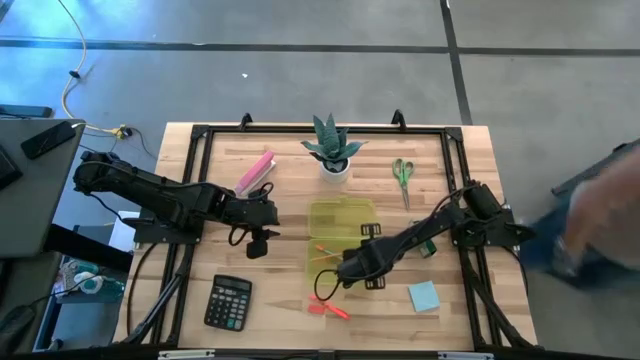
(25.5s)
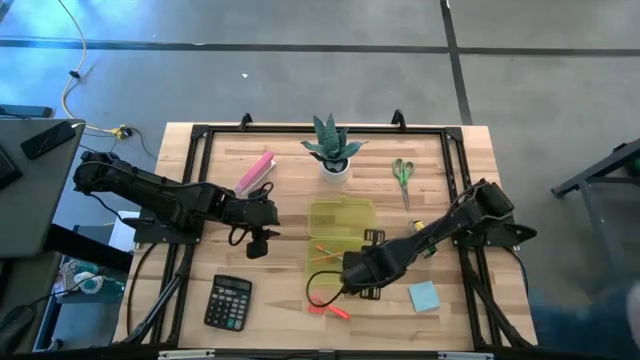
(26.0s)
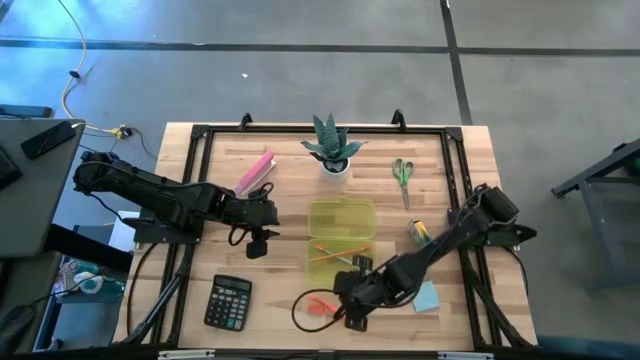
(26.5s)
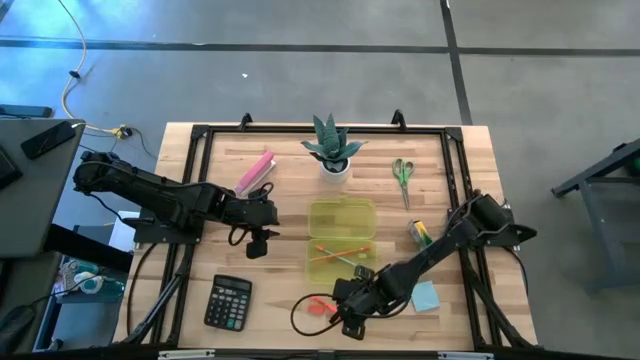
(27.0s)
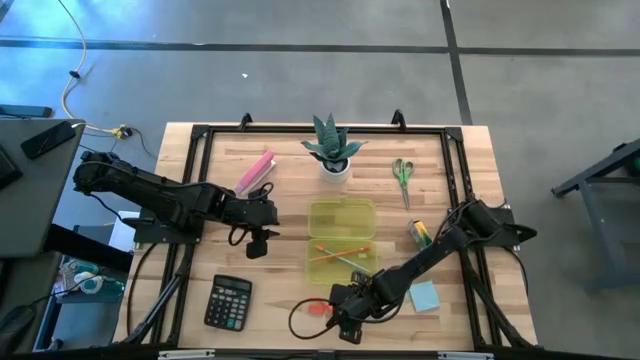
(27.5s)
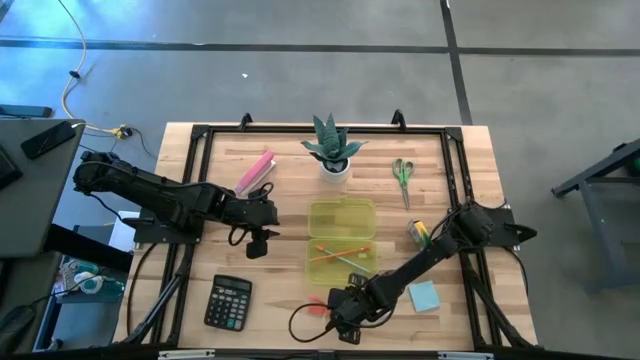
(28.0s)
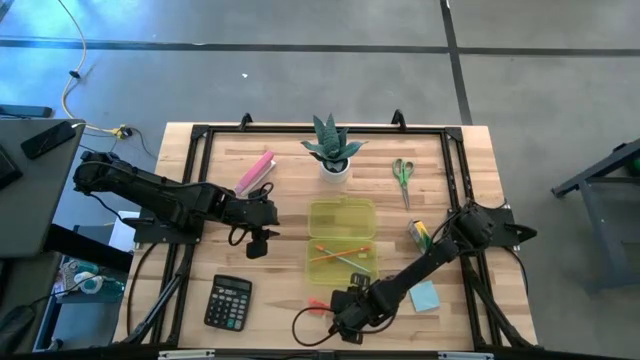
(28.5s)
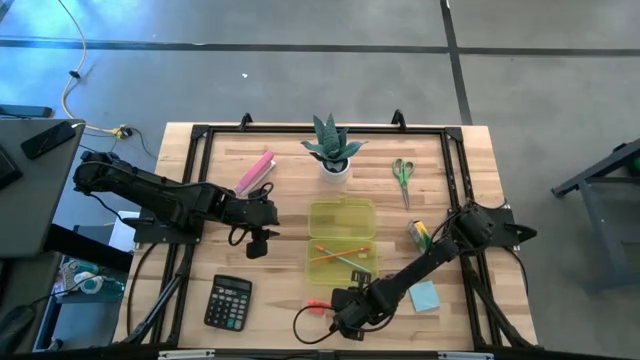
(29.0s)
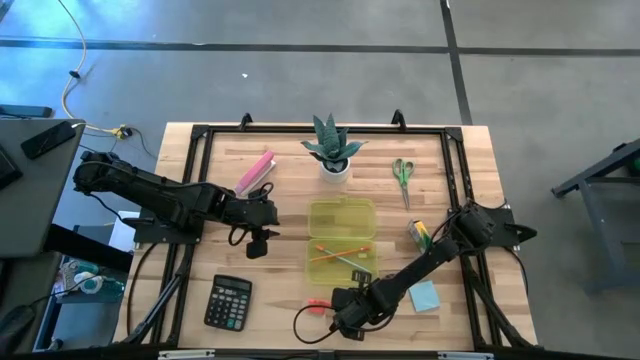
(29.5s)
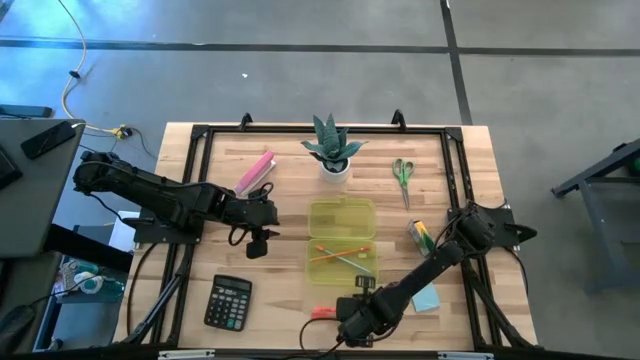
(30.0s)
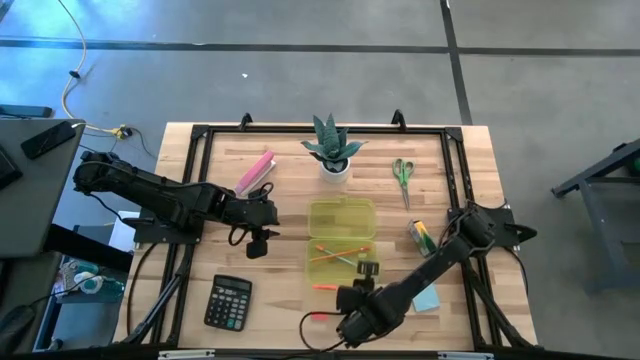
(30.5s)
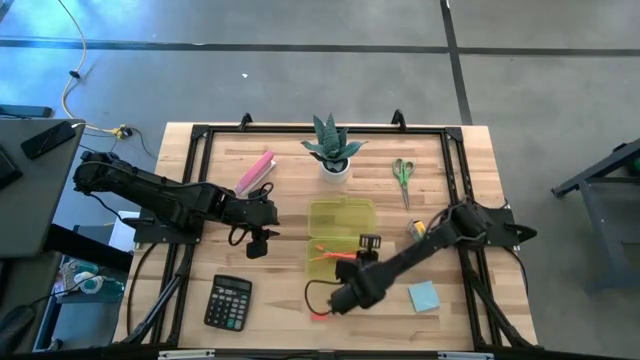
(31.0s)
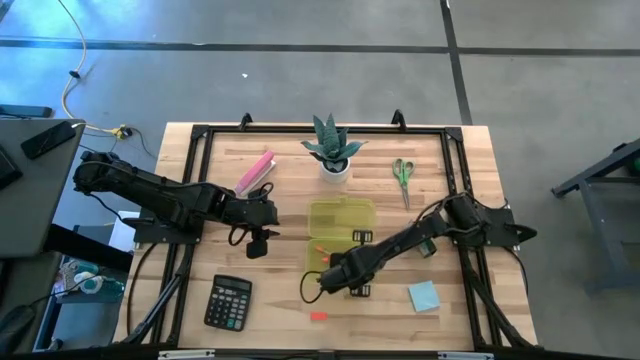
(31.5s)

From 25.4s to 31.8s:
Task: Pack school essentials
Put the orange pen into the supply box

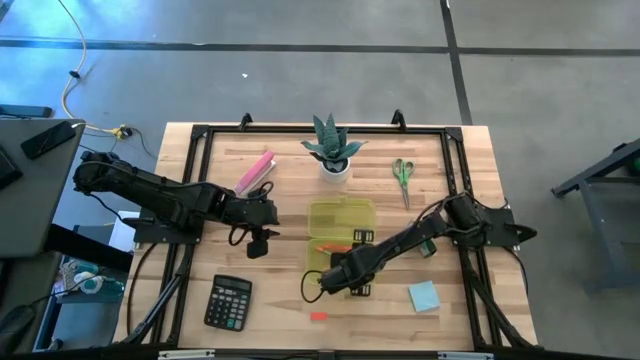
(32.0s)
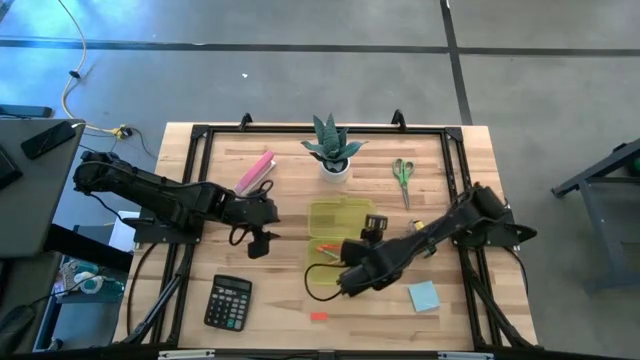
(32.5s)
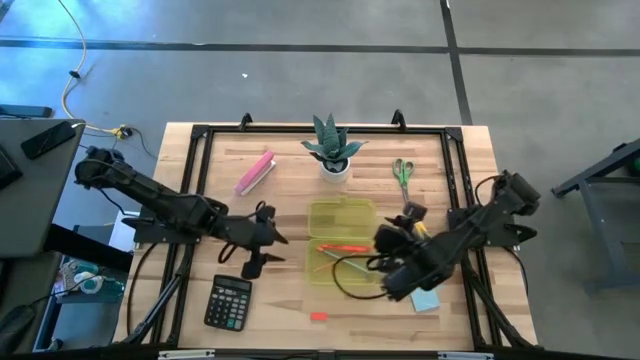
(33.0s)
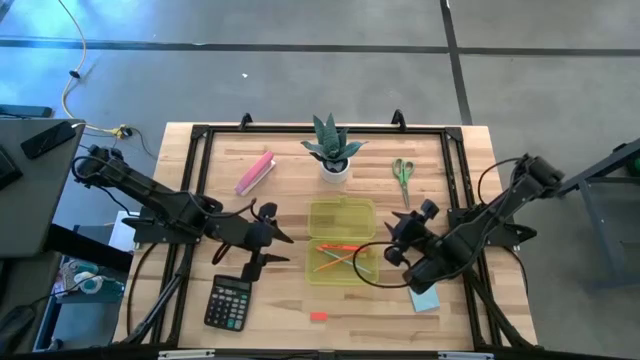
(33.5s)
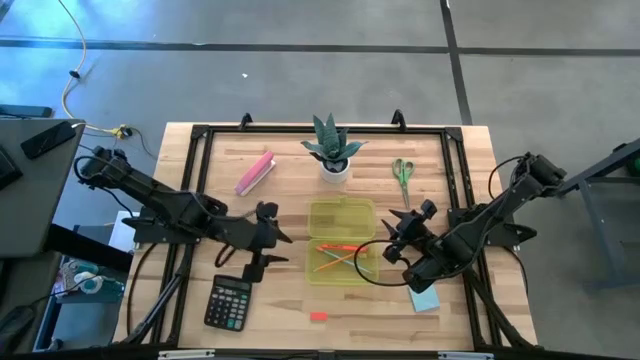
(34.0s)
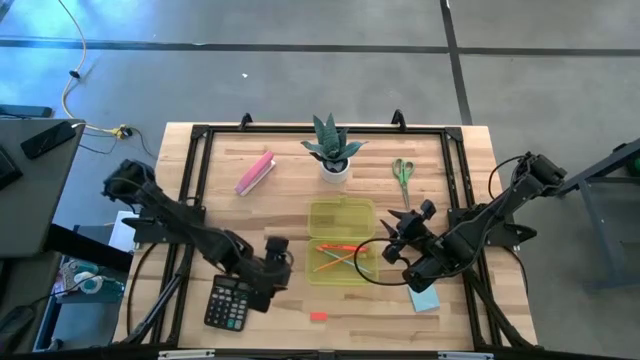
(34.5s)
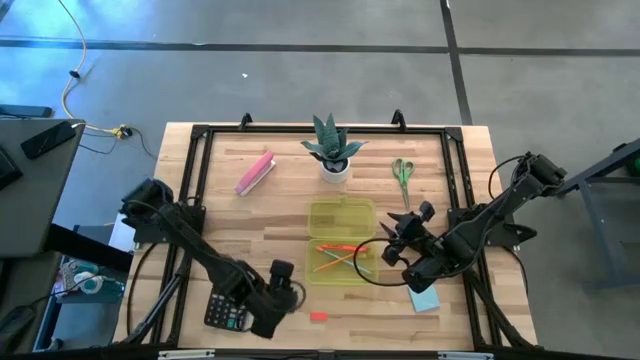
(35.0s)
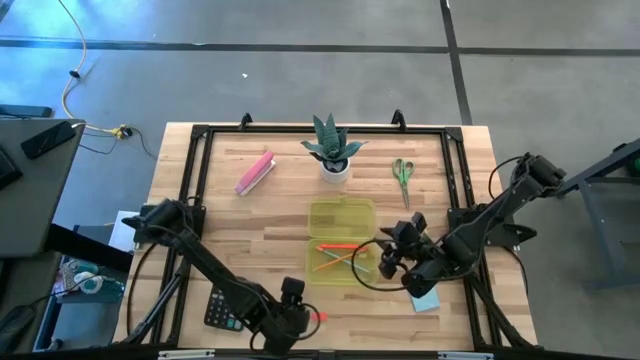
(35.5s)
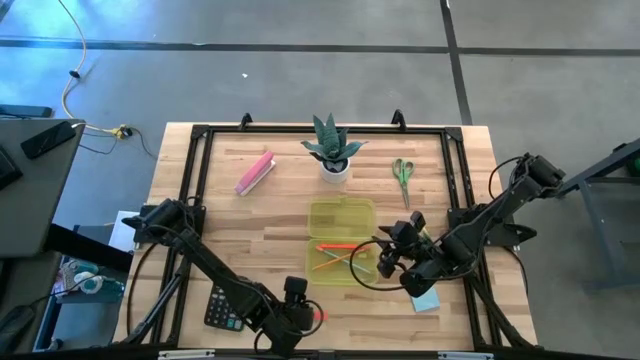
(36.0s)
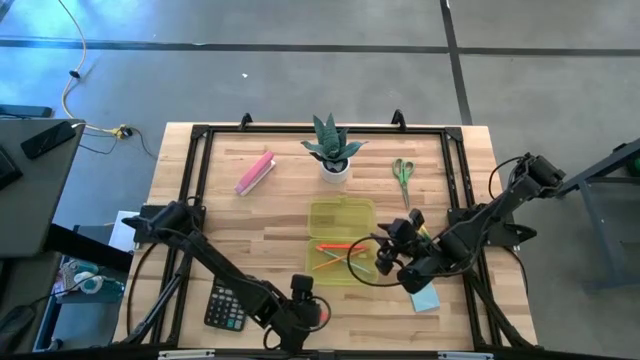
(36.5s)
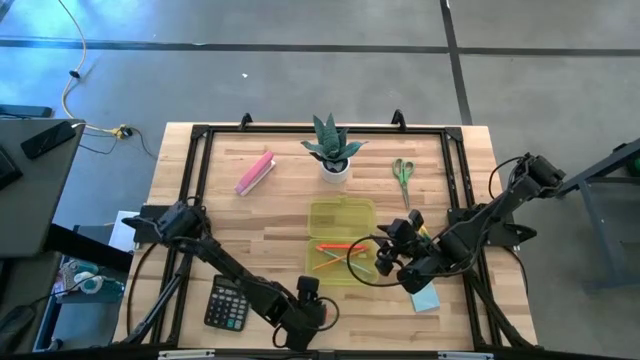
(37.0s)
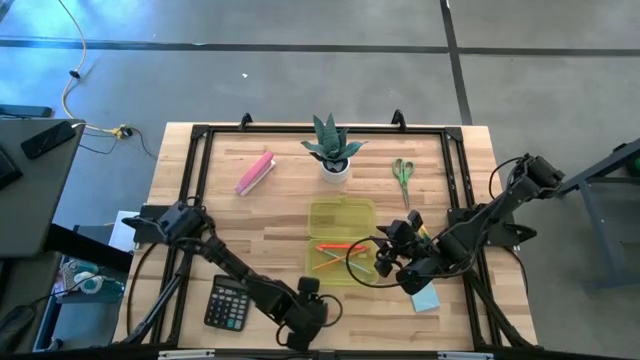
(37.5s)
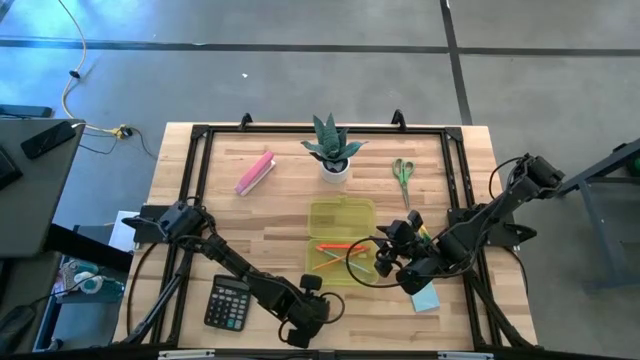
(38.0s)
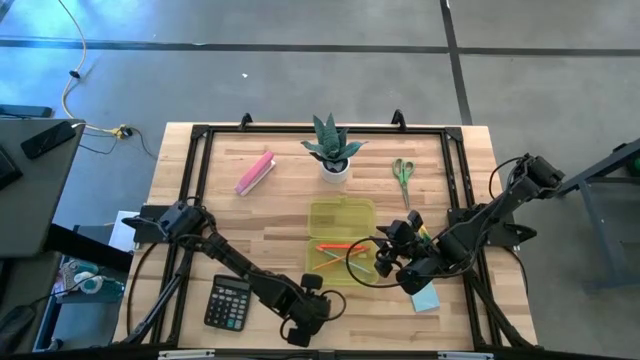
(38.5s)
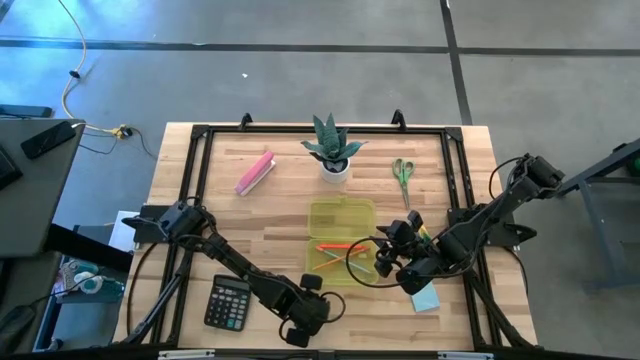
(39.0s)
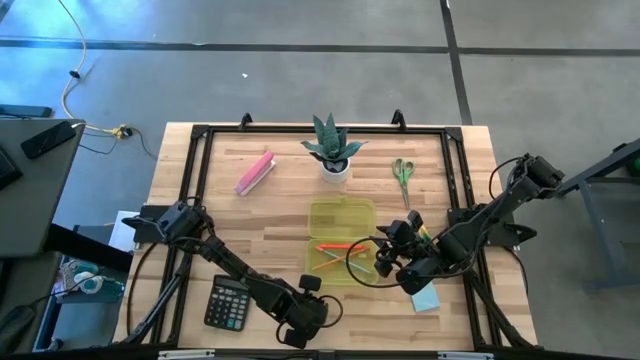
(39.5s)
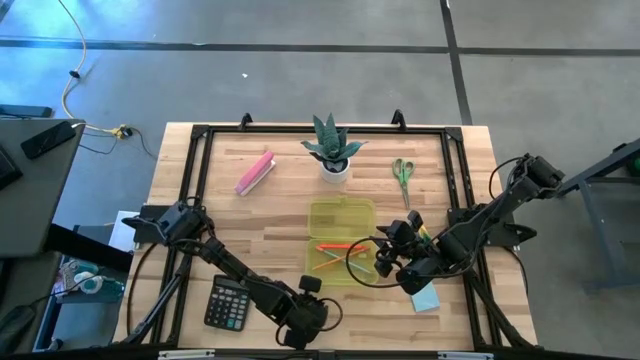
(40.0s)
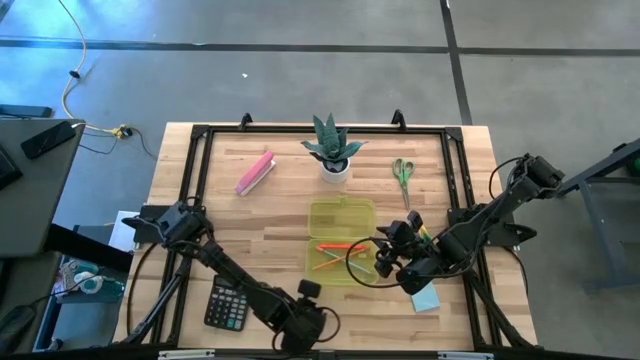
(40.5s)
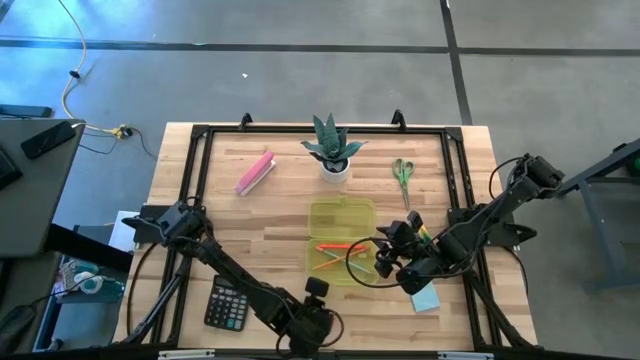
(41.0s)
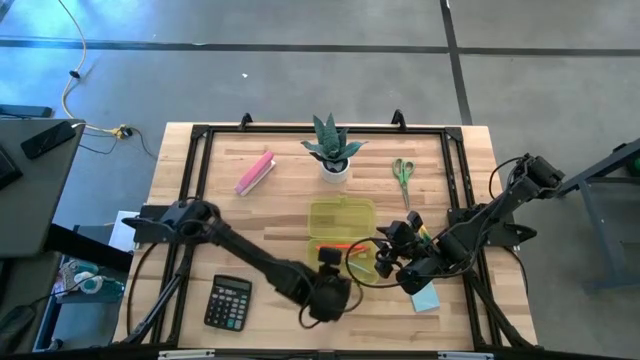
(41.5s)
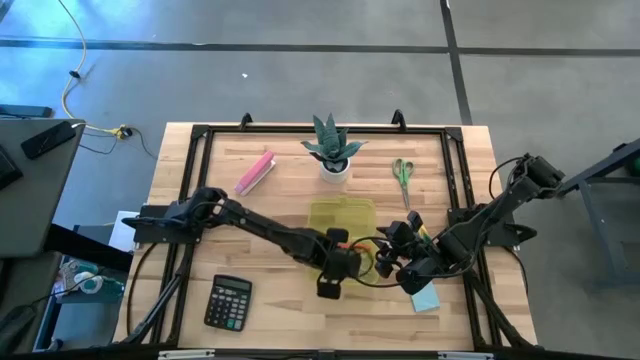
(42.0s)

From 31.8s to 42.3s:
Put the orange eraser into the supply box

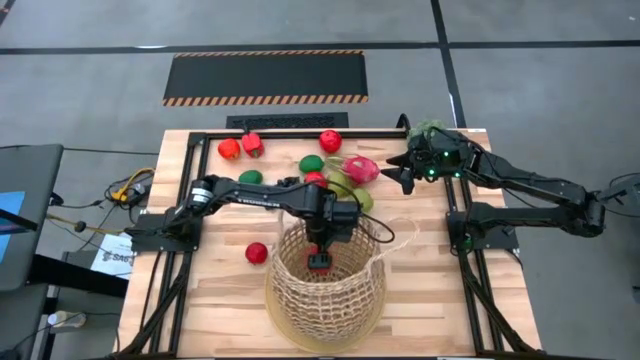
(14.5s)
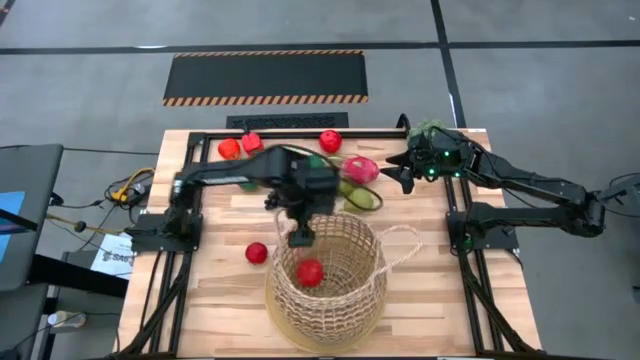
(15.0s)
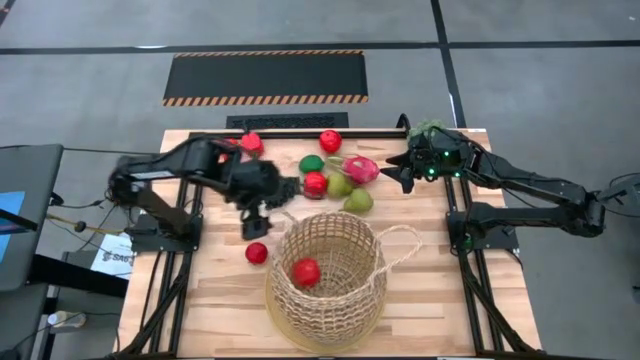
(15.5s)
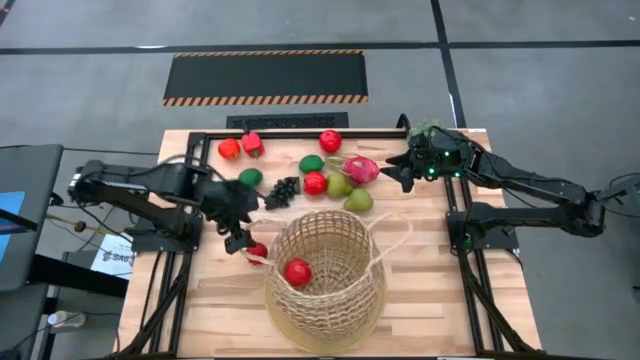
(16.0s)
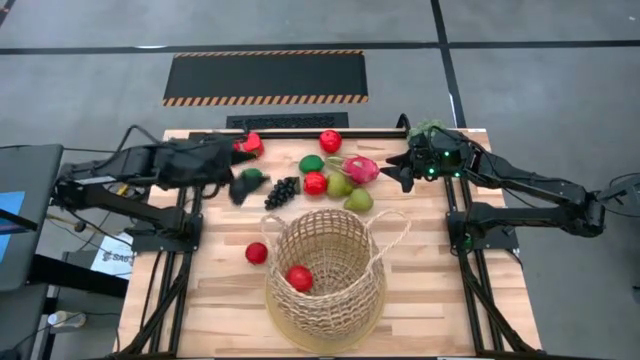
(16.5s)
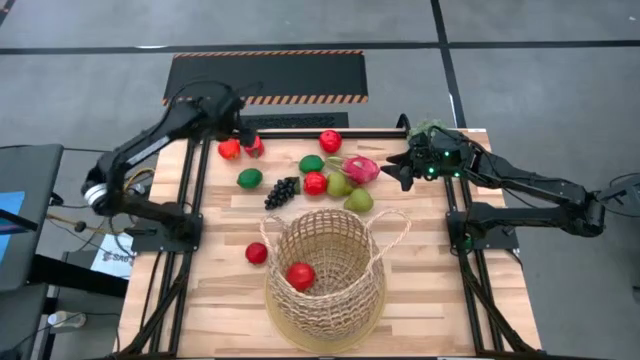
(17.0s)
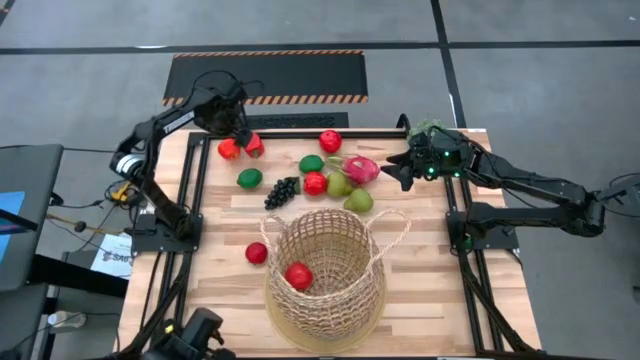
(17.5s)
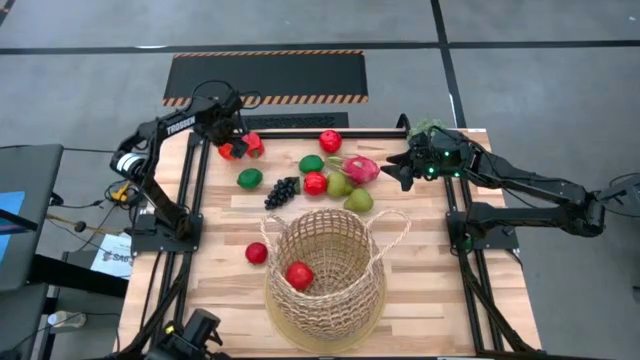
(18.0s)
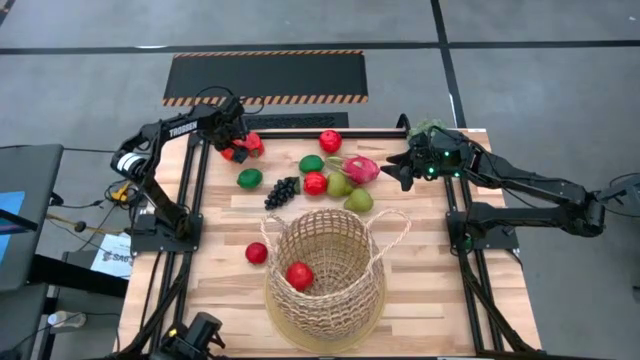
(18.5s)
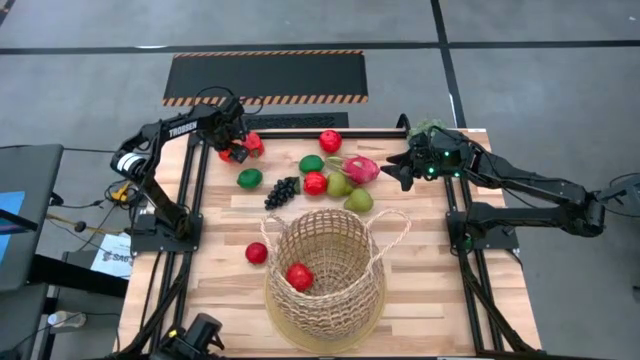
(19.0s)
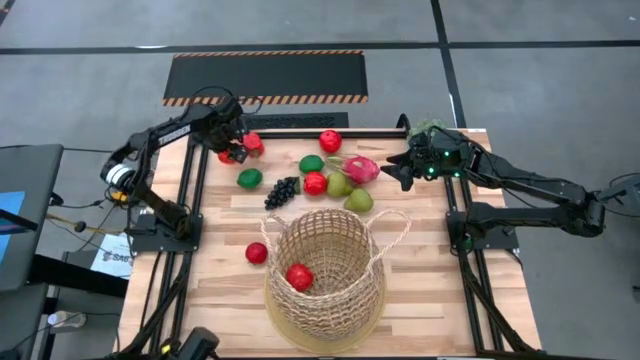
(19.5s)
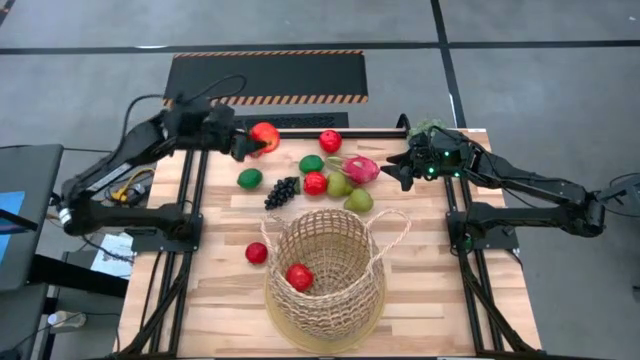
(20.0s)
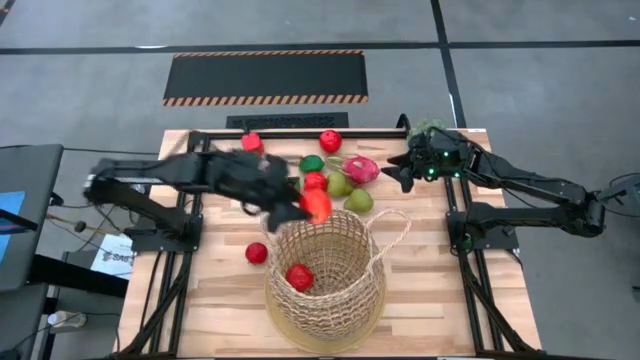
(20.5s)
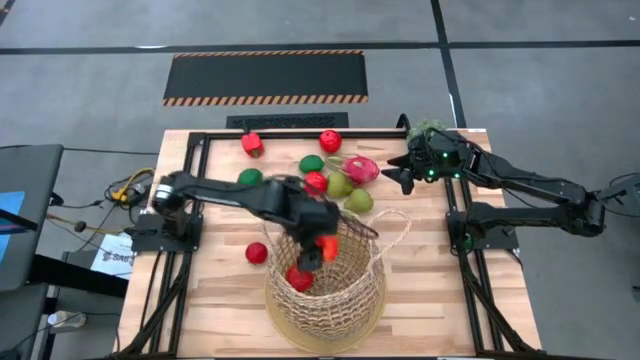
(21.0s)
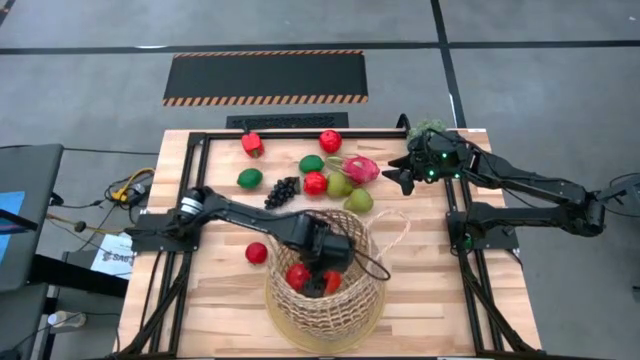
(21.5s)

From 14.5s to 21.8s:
Task: Build produce basket
Put the apple into the basket
